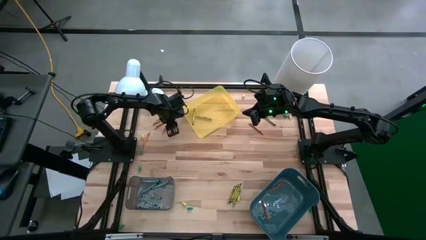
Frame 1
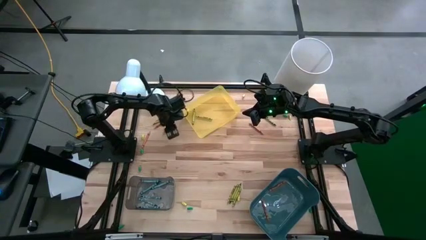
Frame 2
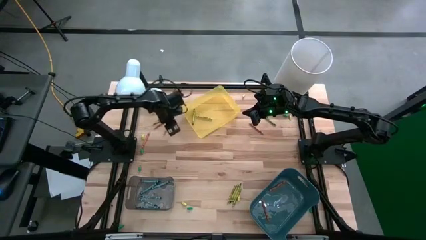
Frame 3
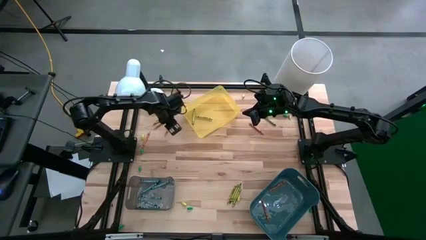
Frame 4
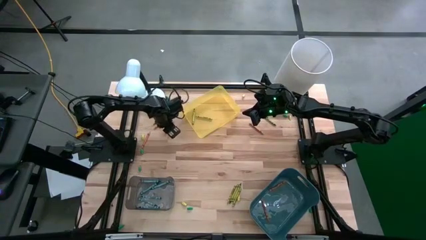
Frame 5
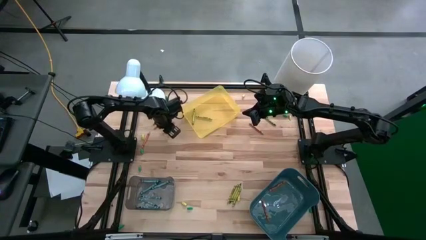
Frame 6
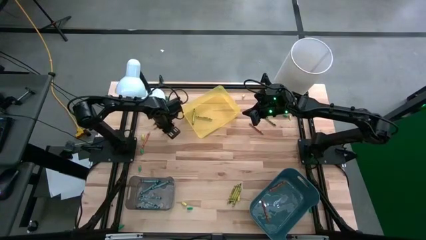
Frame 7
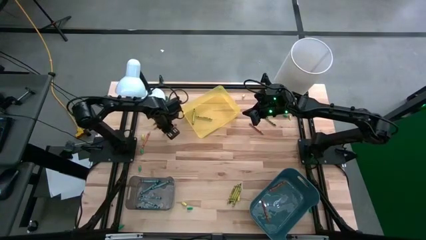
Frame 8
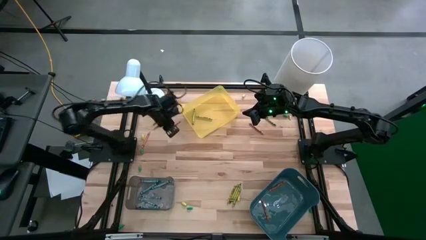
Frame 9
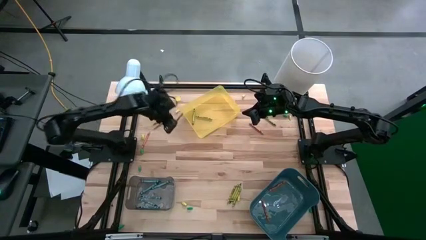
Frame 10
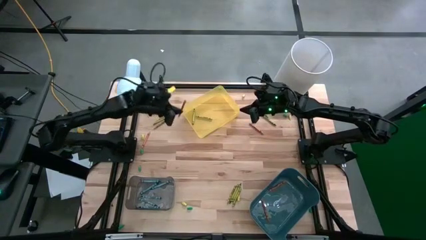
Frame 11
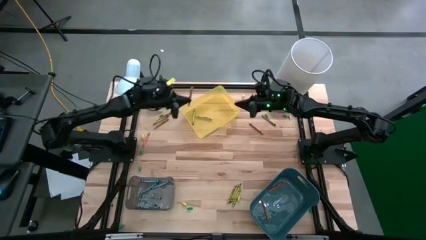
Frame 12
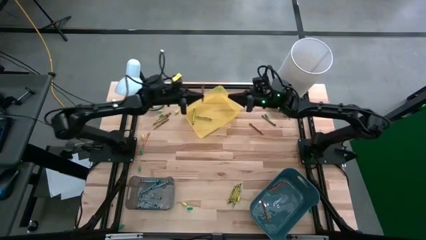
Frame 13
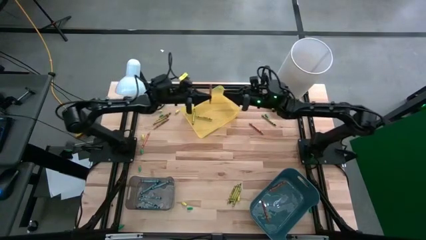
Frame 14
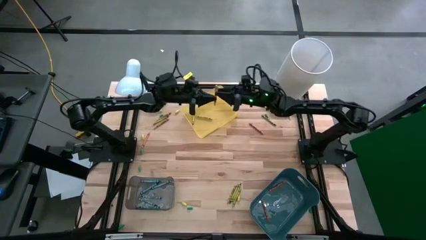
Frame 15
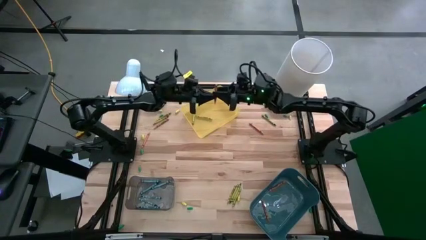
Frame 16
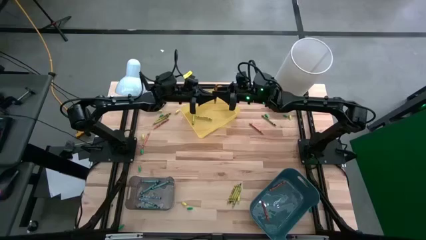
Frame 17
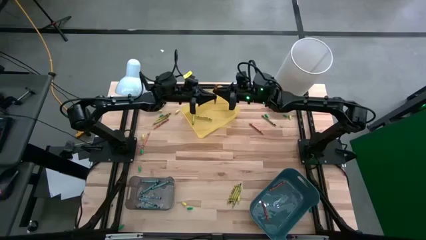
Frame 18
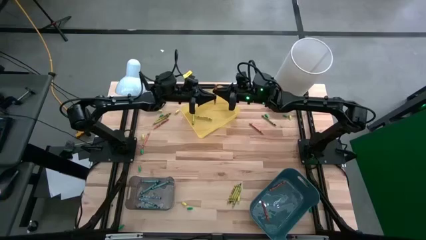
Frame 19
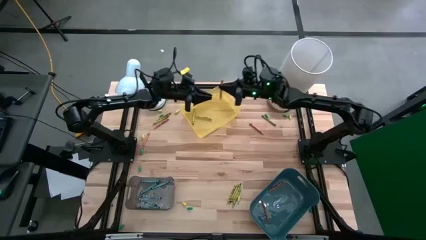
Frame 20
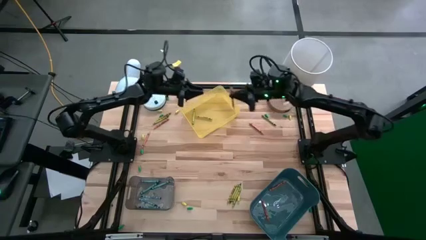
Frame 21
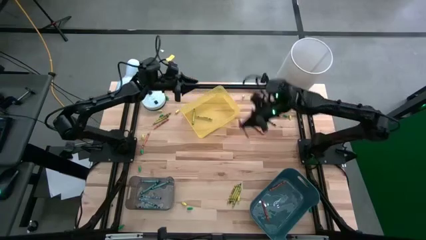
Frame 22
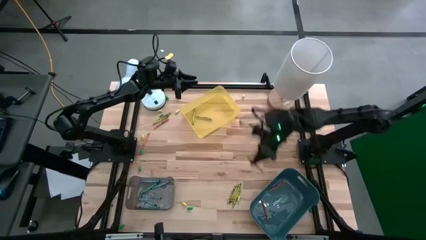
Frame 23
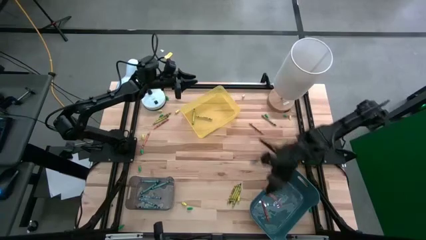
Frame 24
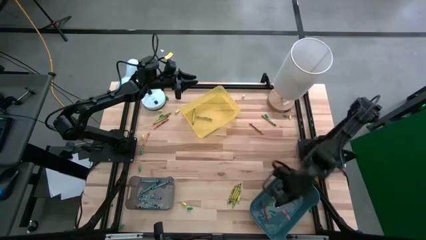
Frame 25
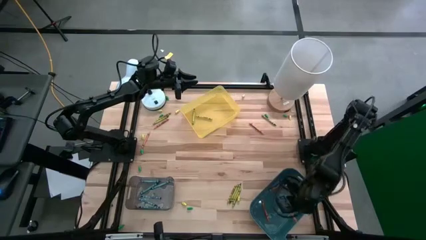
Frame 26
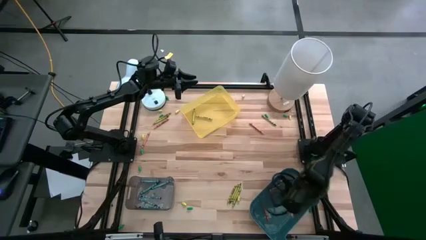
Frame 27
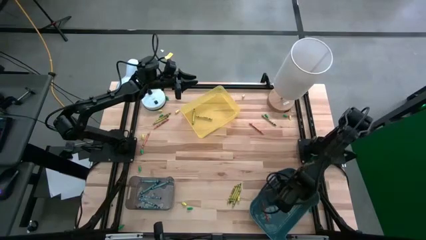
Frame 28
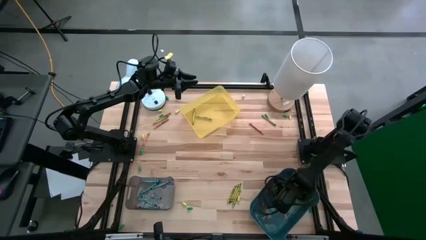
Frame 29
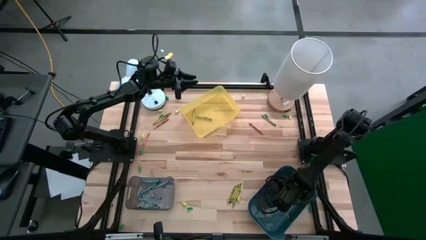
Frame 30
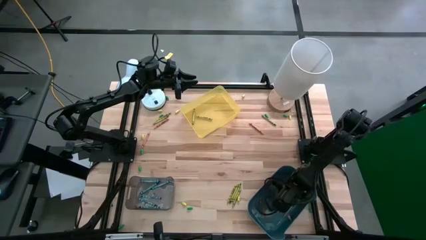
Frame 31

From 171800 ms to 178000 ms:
Task: Sort crayons
Put the orange crayon into the green bin

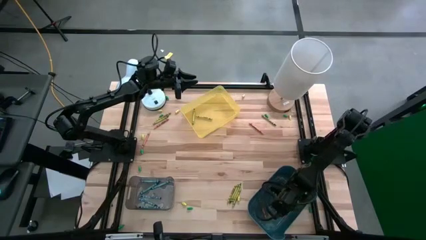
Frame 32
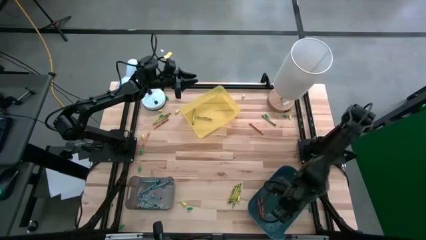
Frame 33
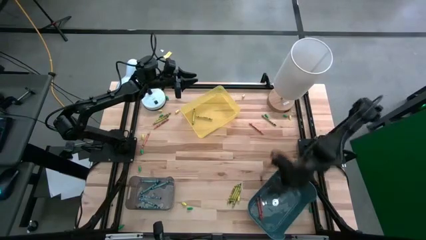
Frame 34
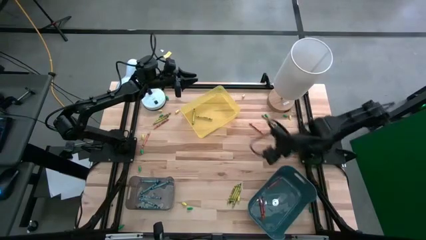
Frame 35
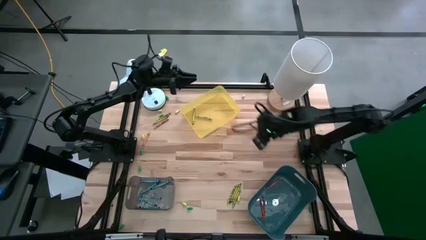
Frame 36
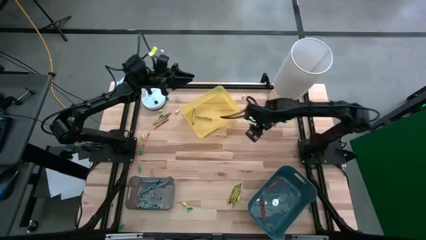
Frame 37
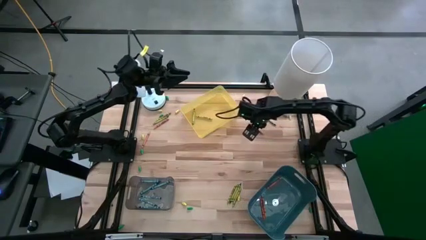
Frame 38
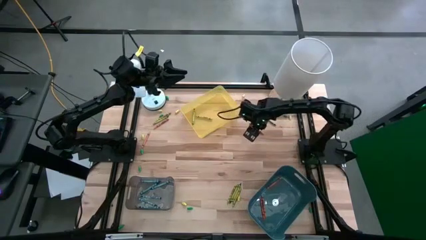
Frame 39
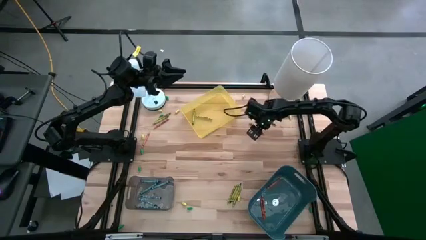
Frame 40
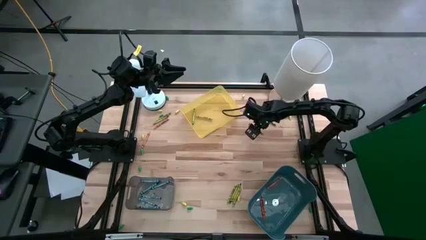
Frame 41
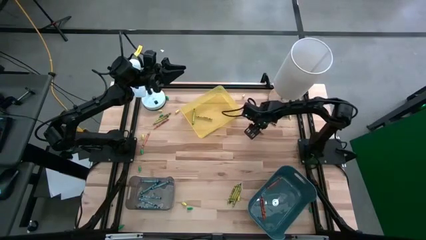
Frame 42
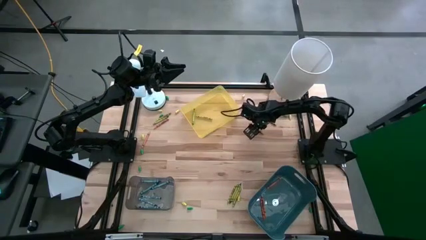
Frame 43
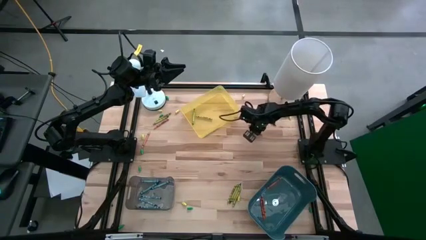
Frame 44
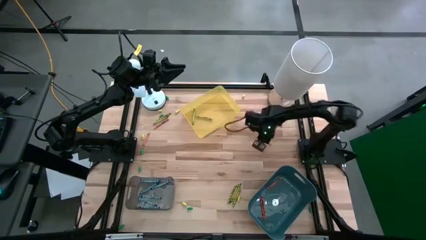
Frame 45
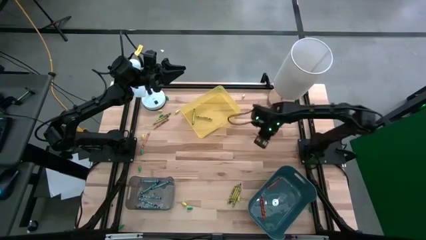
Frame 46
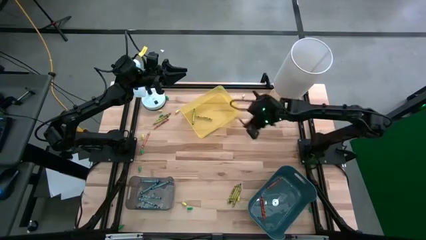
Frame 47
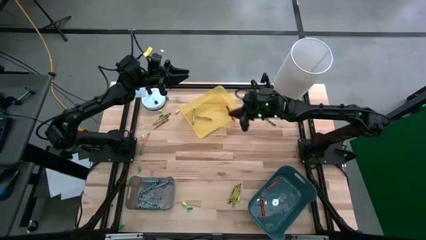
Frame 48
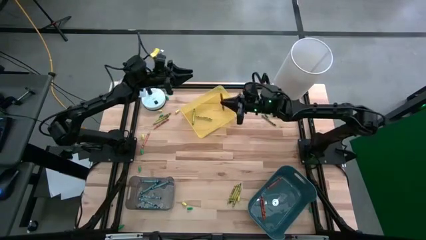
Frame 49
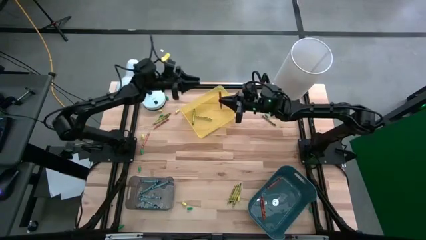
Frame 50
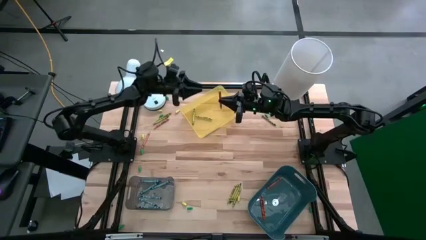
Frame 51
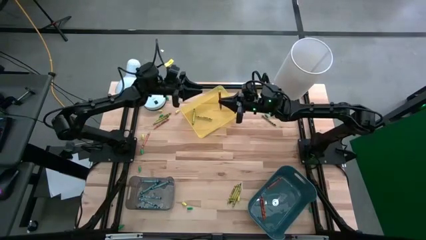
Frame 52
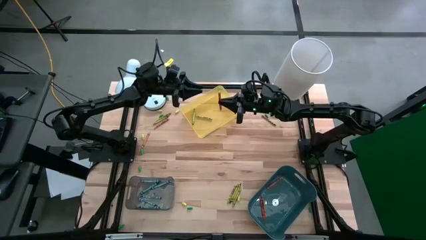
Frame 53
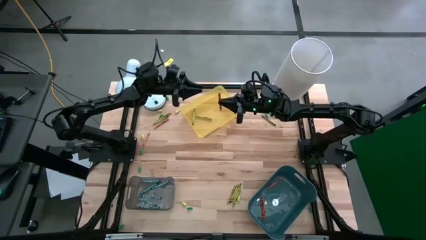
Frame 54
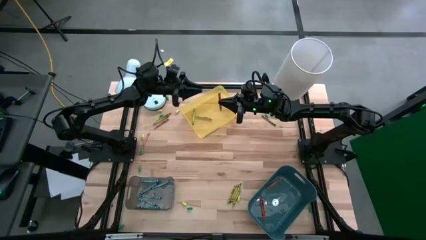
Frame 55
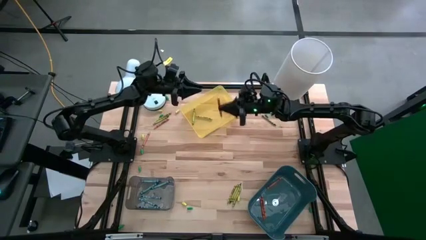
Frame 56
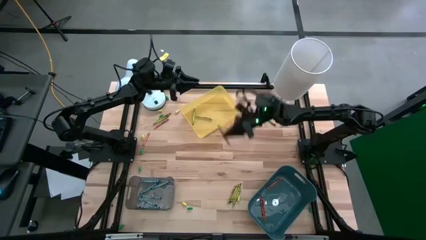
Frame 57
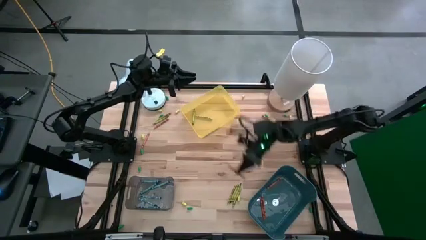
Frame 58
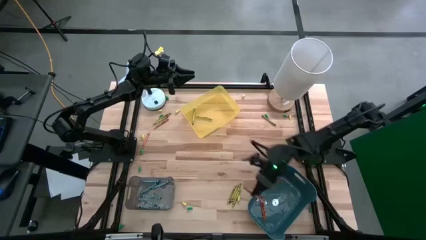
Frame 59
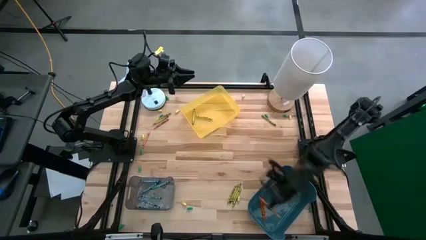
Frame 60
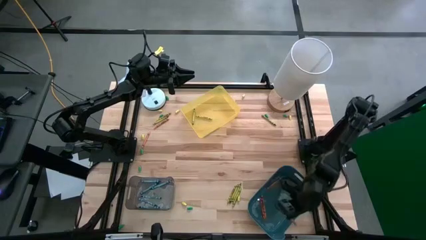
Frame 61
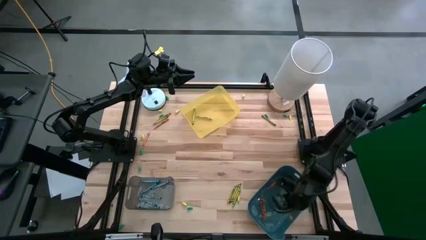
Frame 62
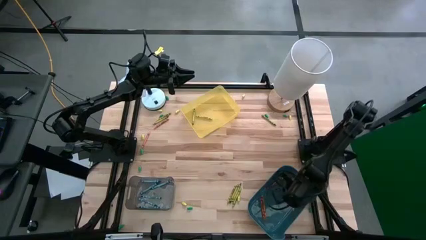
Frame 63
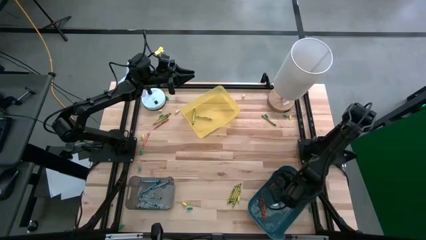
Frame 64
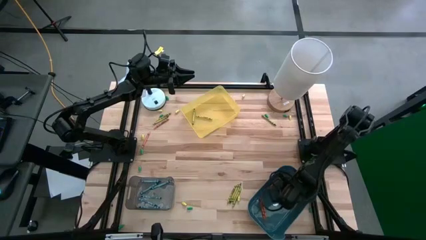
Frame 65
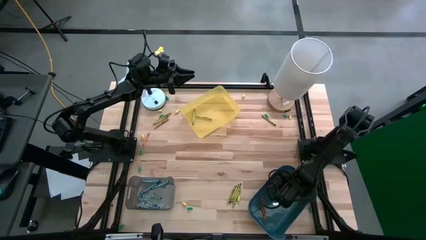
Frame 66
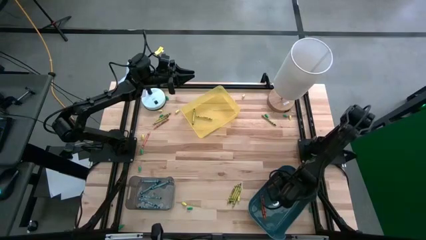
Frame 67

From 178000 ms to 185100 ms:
Put the orange crayon into the green bin

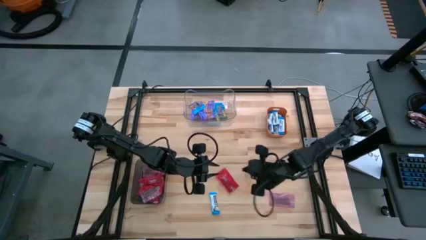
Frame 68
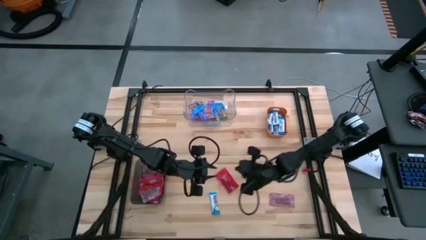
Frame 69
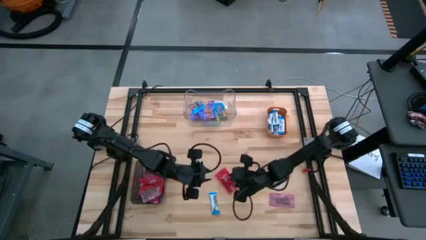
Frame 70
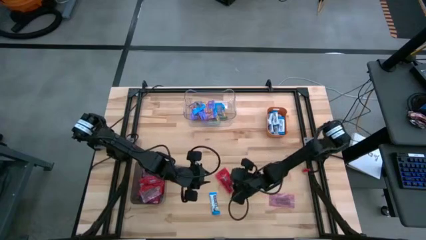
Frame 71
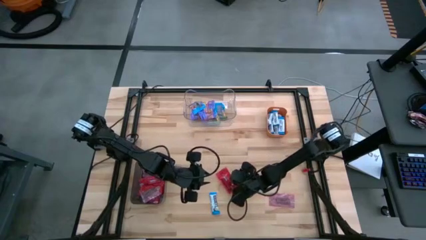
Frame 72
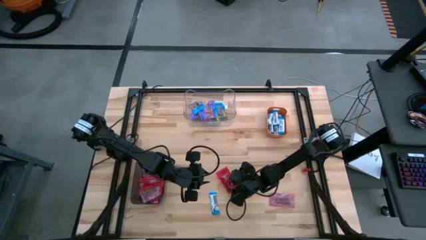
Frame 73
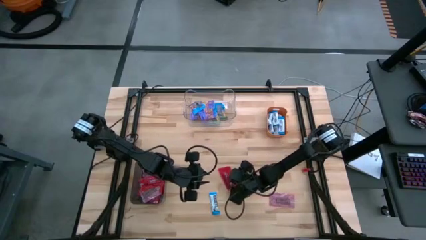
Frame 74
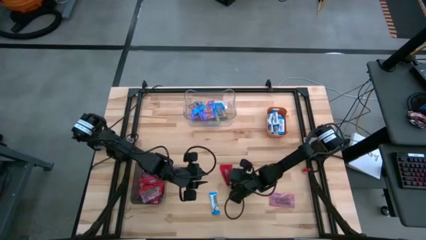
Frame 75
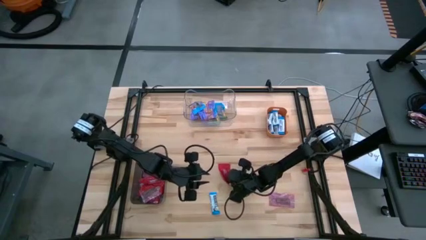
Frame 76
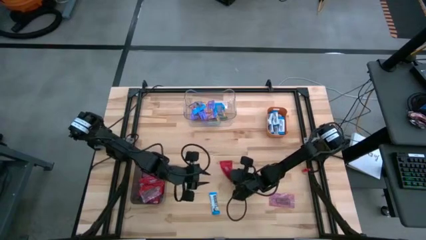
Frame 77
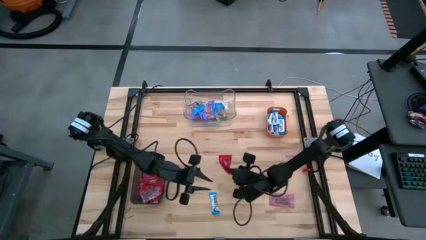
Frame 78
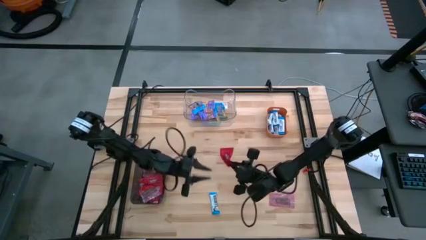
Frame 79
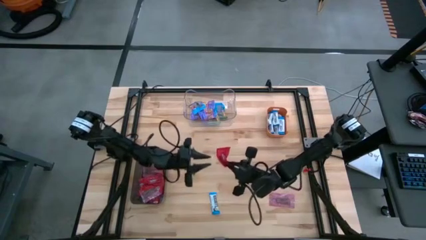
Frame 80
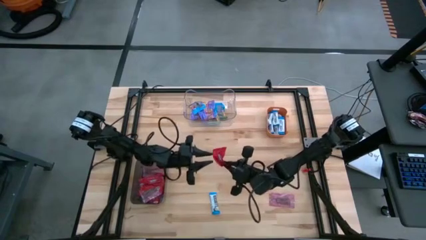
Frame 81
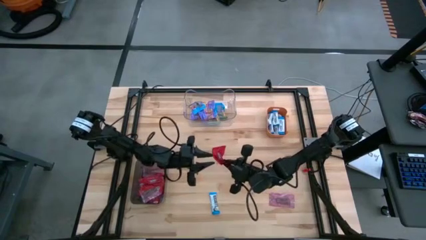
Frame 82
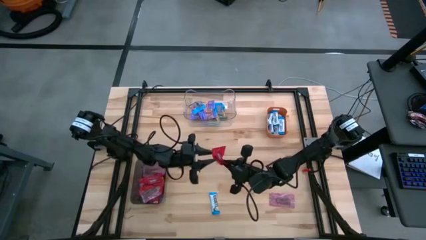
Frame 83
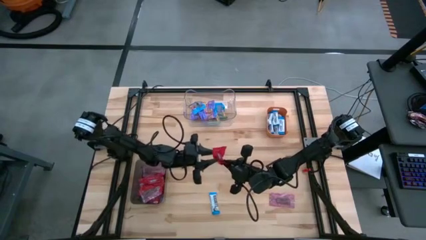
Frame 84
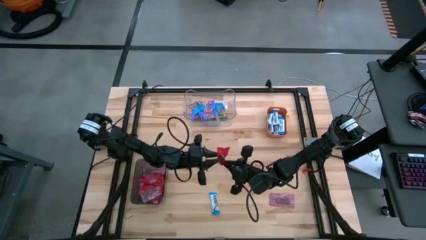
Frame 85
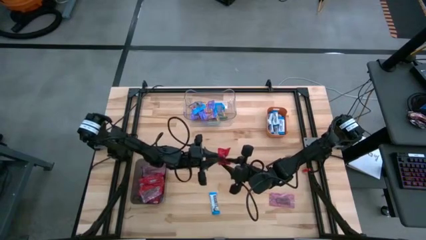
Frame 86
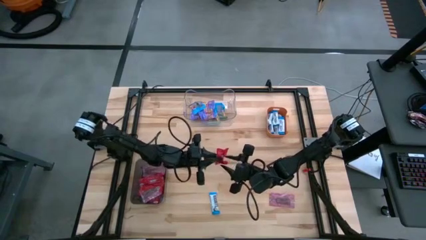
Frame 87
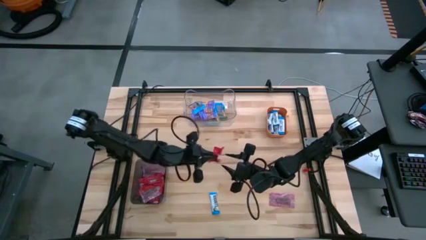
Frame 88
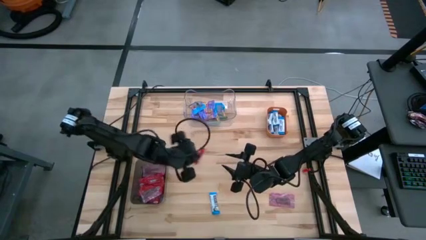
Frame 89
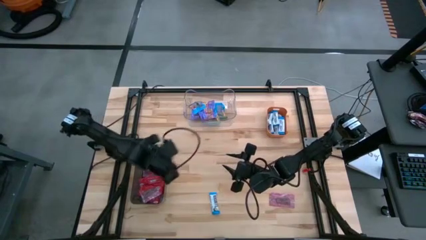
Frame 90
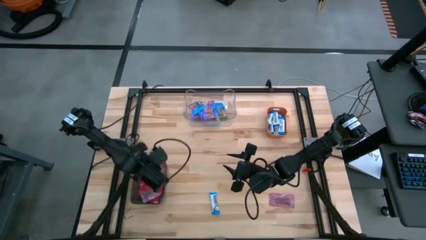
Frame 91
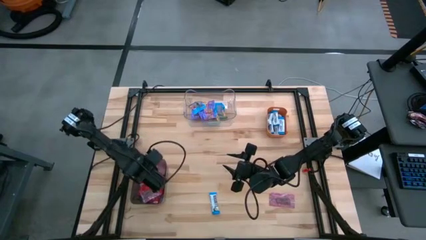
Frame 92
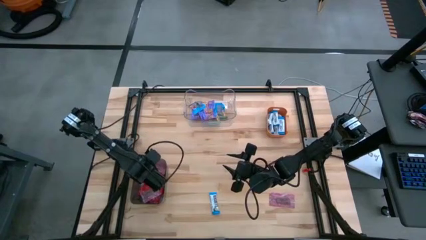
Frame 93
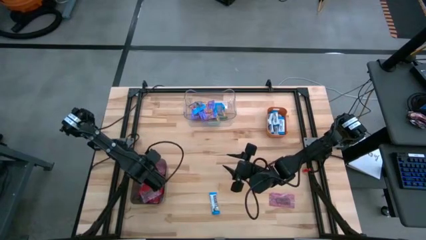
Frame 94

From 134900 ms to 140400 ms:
Task: Sort candy
Put the red candy into the black bin
